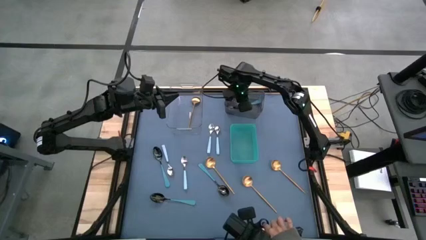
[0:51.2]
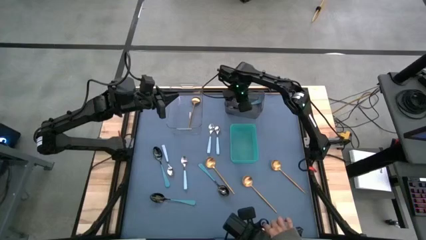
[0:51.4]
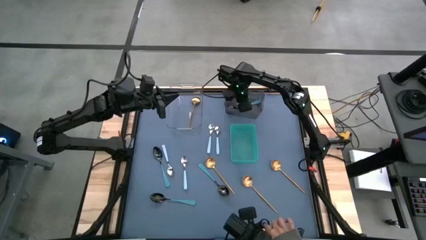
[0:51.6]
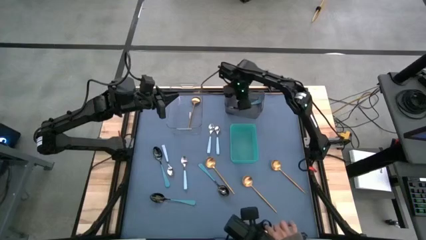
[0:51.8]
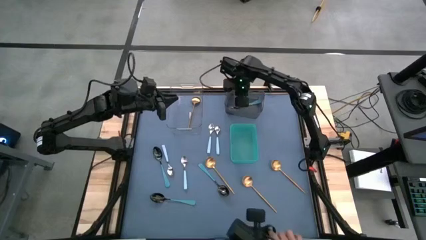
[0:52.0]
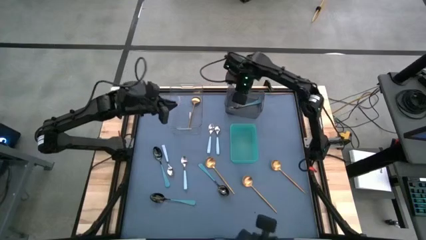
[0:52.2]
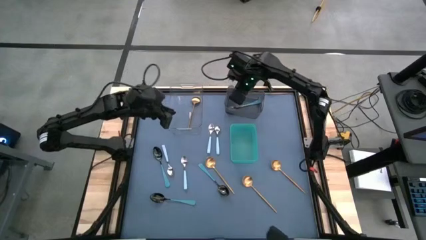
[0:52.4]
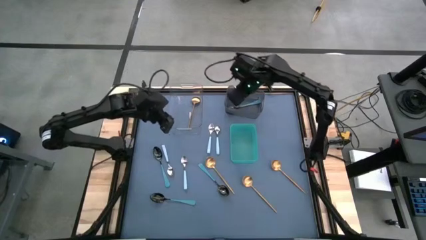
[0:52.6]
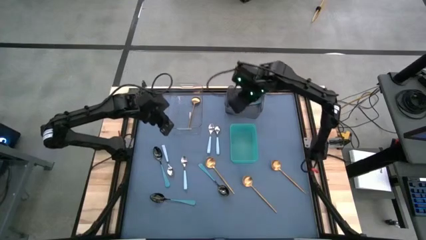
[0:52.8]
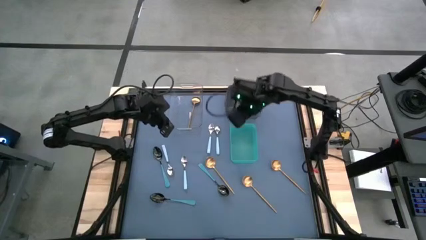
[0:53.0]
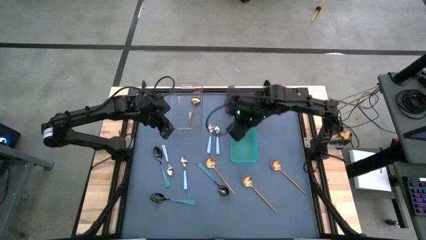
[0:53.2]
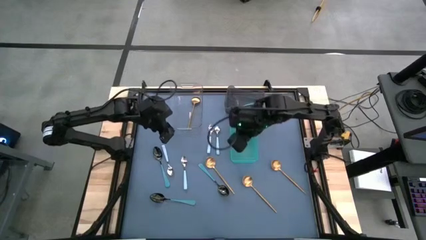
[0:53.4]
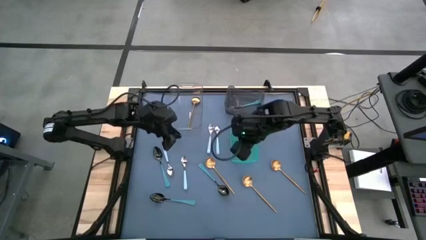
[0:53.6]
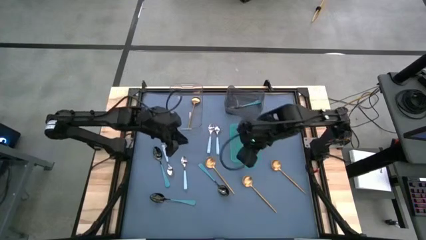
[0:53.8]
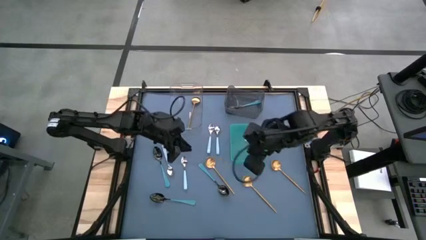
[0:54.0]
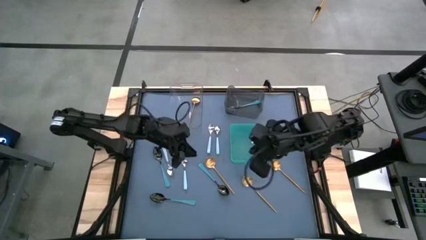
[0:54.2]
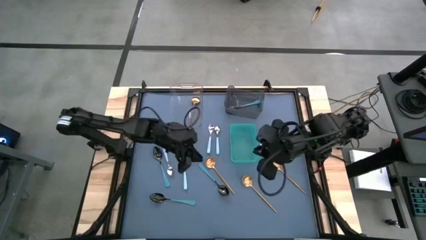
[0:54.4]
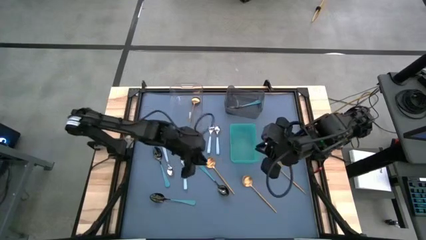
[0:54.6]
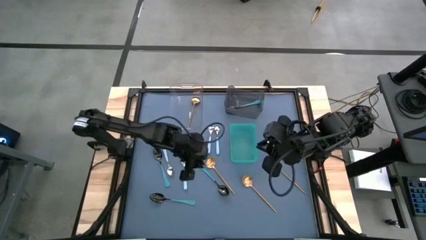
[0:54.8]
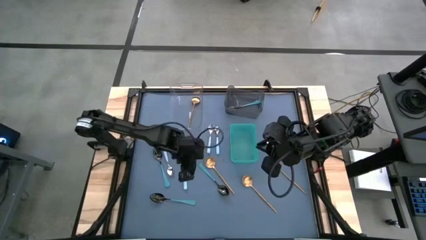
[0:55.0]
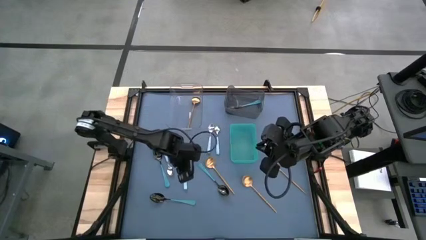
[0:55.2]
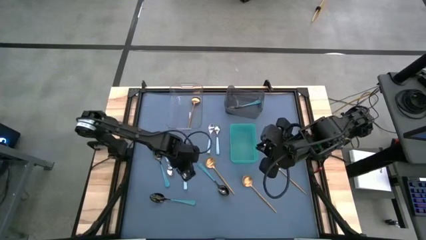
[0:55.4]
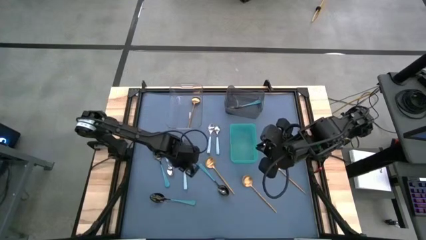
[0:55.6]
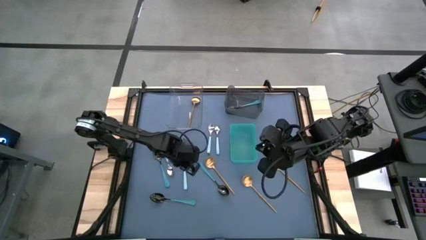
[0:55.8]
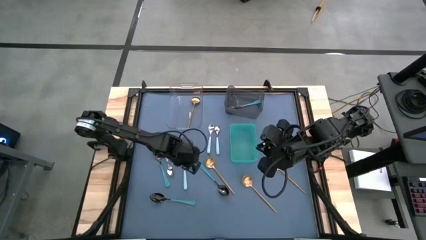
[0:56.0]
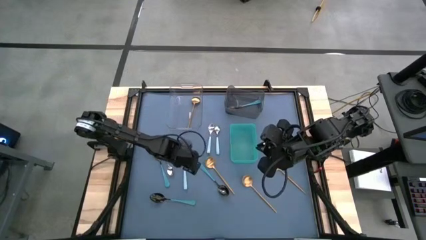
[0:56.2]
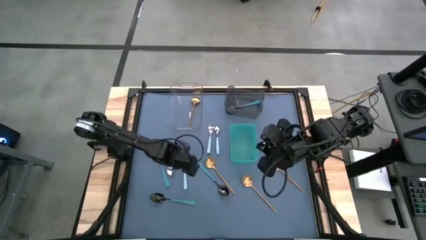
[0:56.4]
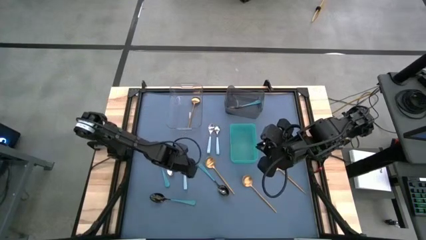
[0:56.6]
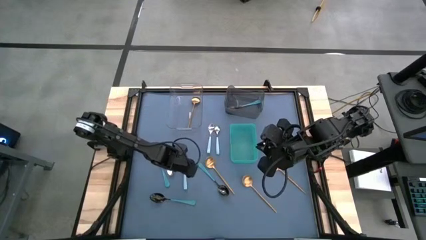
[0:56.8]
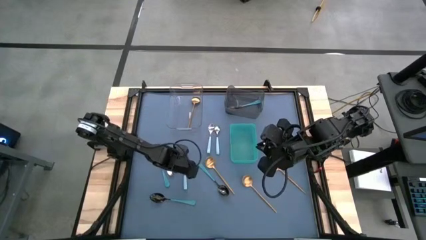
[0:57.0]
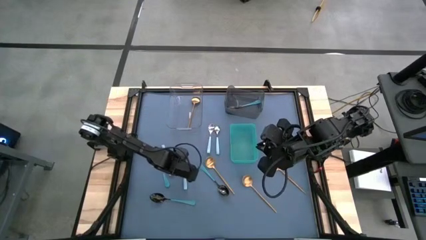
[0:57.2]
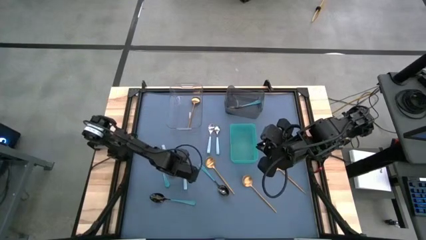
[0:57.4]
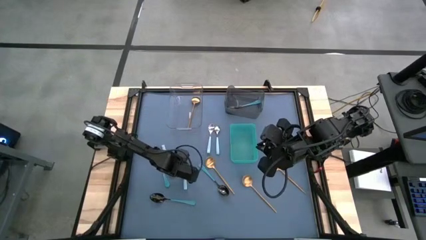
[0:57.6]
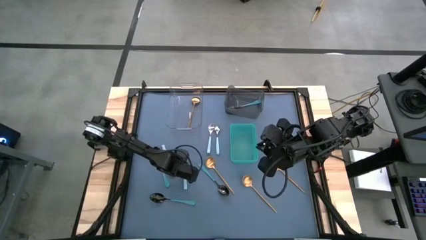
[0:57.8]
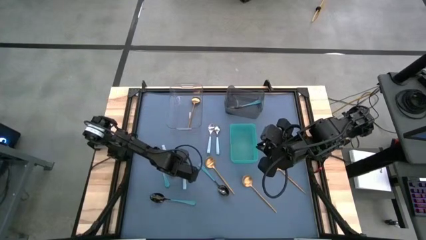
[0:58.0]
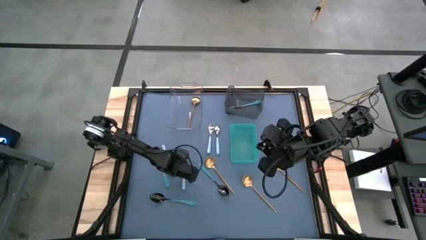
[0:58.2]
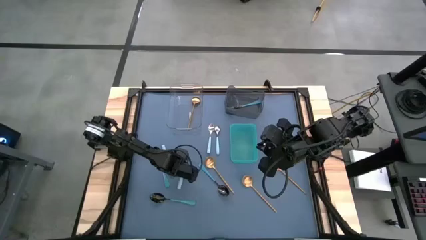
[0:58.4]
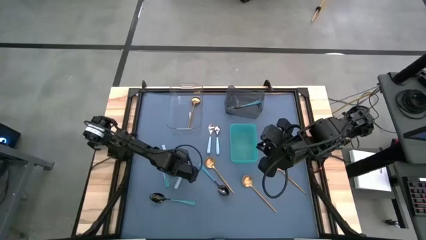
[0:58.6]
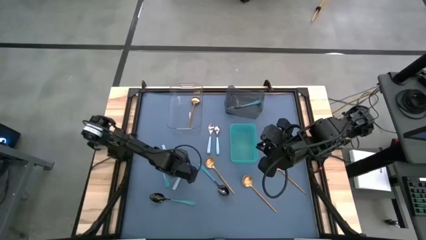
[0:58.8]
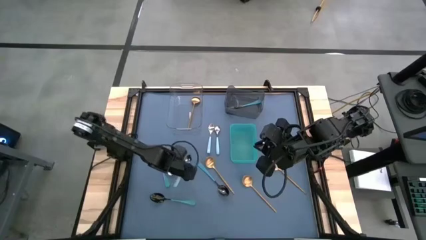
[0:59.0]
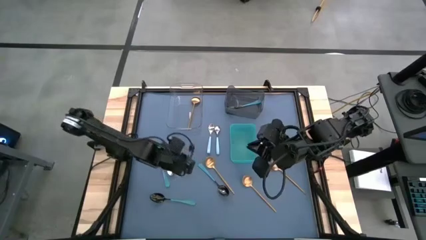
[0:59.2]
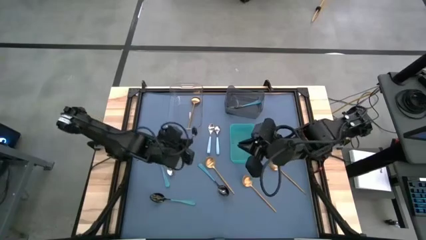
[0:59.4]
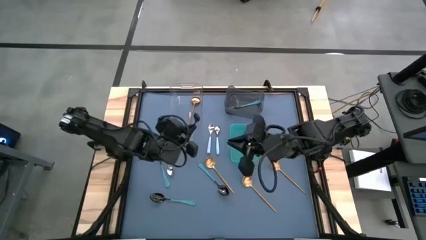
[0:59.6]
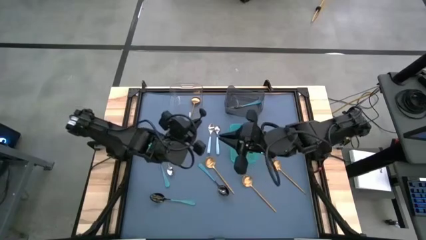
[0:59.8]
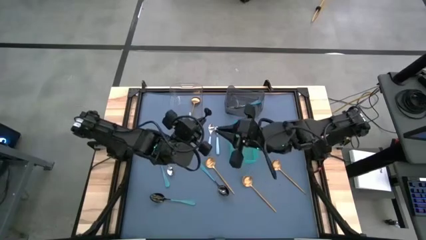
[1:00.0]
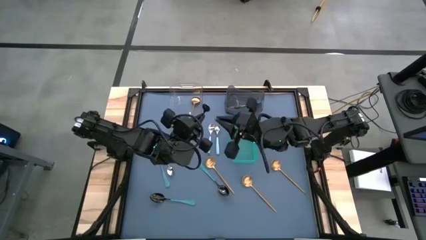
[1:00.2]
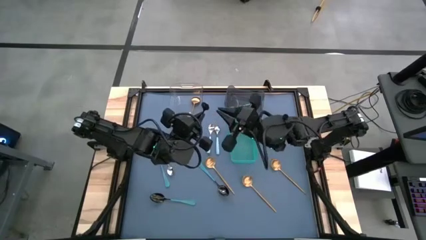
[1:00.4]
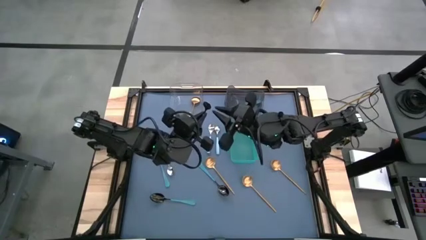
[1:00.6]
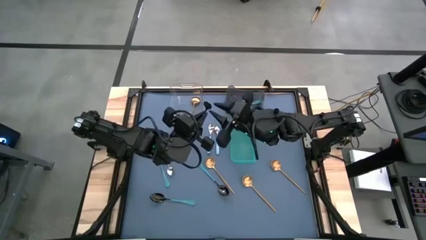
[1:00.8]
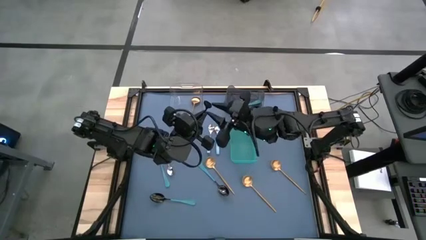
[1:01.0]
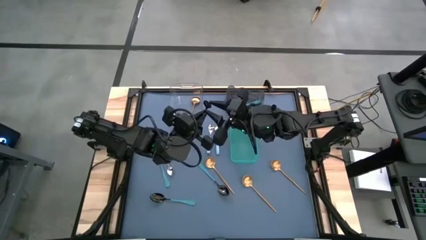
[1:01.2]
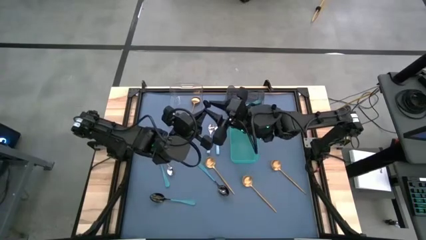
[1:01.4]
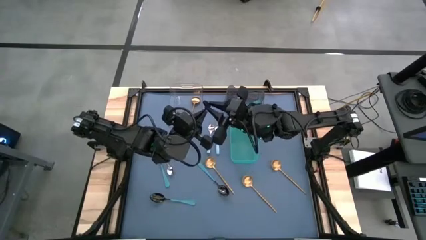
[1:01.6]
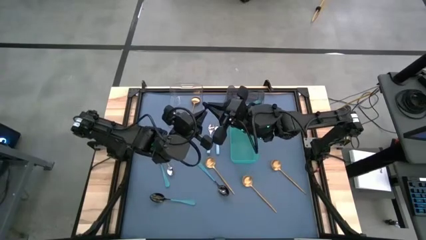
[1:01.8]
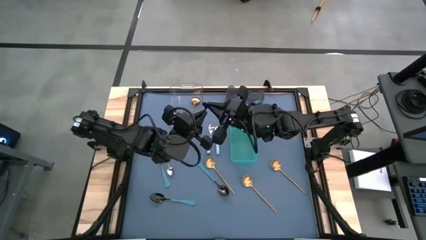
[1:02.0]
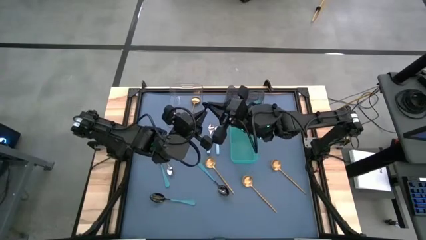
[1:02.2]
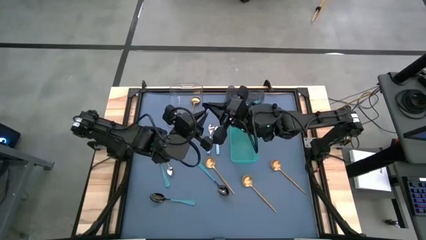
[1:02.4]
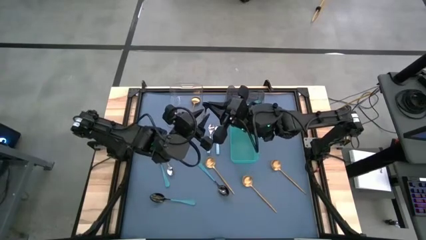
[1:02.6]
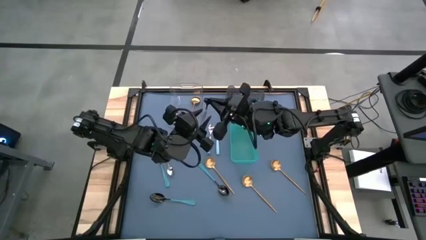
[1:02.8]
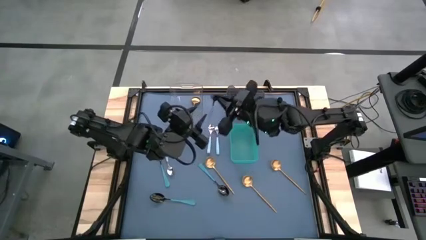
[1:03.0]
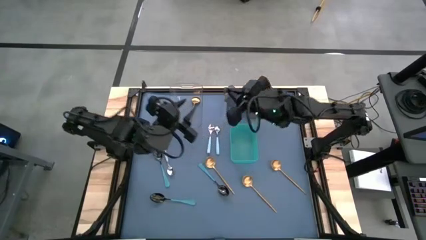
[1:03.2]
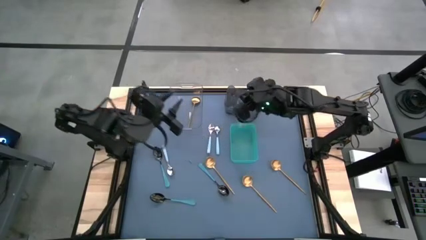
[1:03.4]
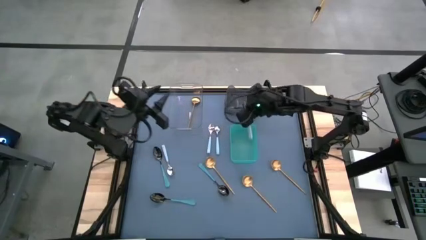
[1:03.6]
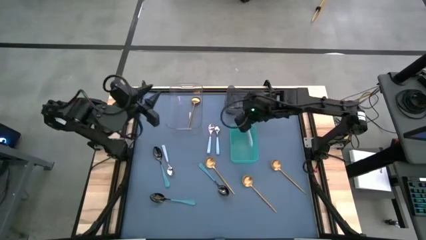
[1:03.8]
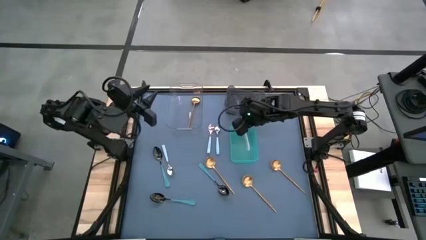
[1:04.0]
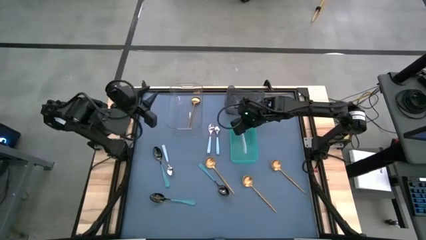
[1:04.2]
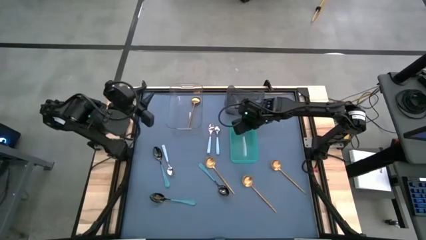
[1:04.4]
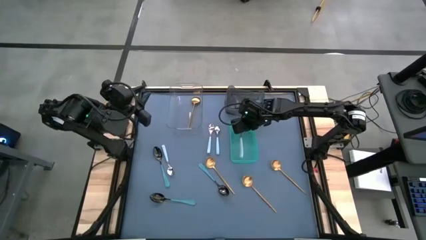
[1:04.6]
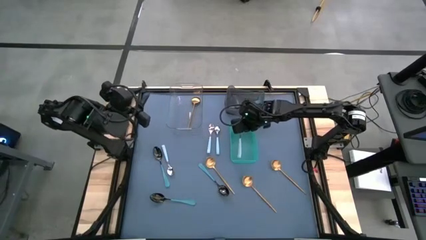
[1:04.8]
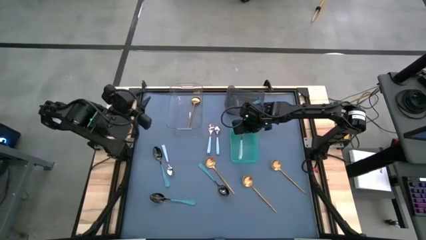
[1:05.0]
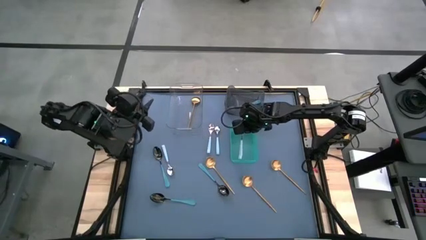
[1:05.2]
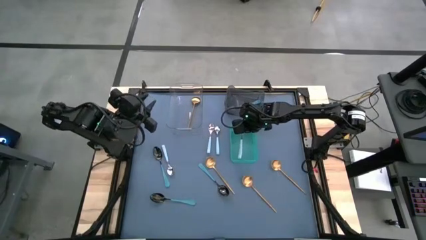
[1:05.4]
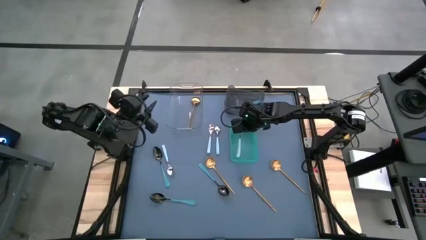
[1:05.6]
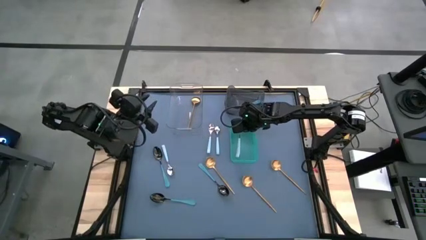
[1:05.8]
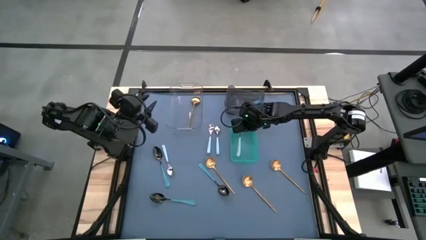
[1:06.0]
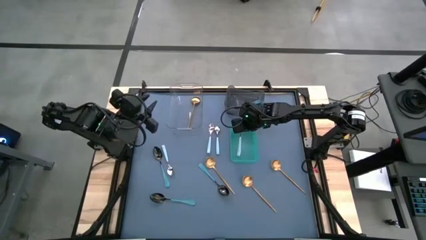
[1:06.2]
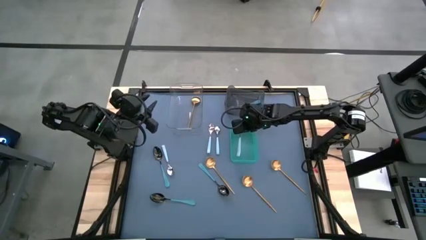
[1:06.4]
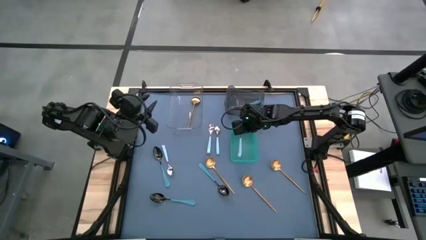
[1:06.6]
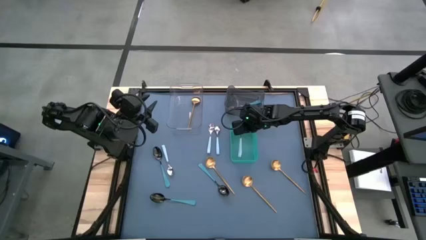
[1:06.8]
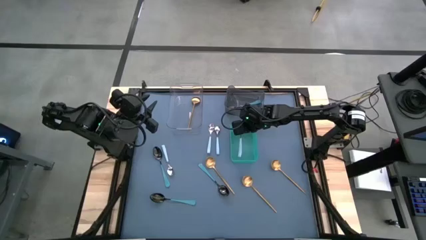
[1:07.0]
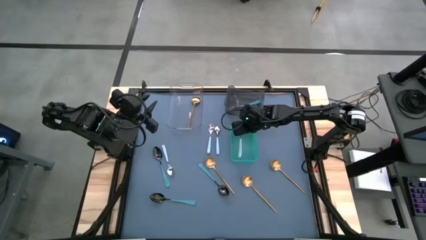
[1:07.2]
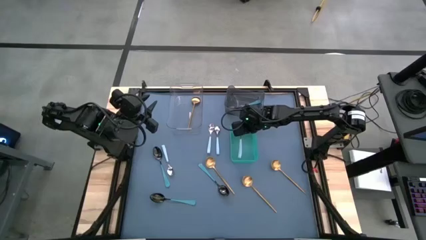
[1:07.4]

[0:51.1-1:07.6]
Task: Sort silverware by color (type)
Put the light blue spoon into the green bin
